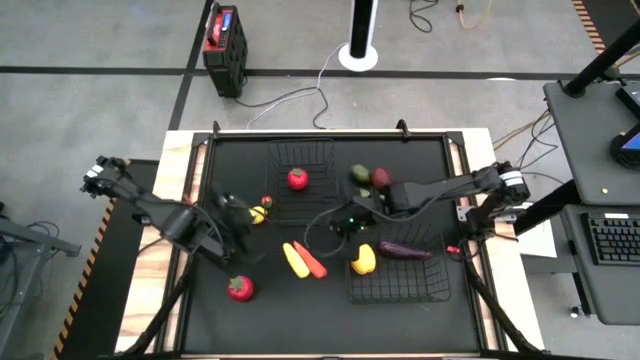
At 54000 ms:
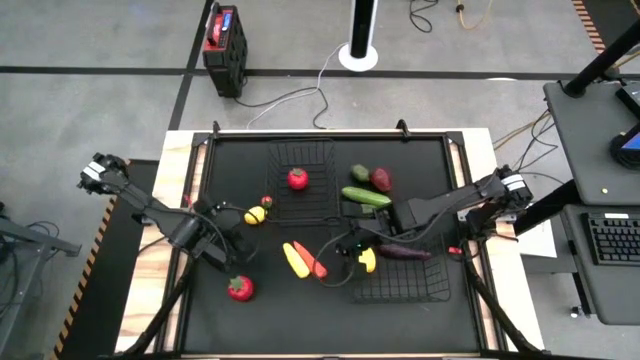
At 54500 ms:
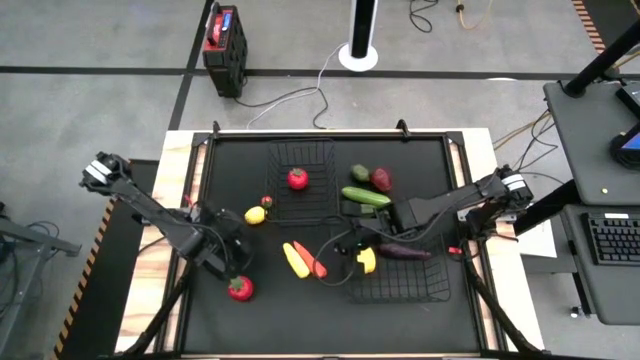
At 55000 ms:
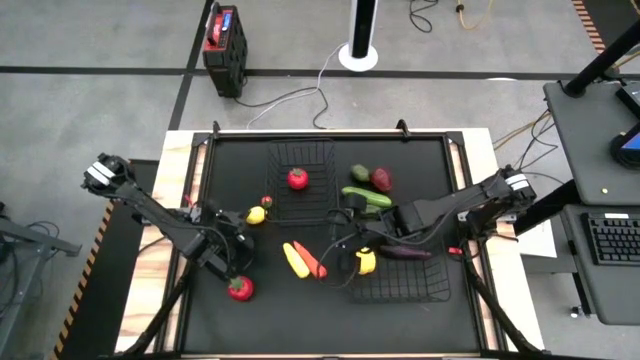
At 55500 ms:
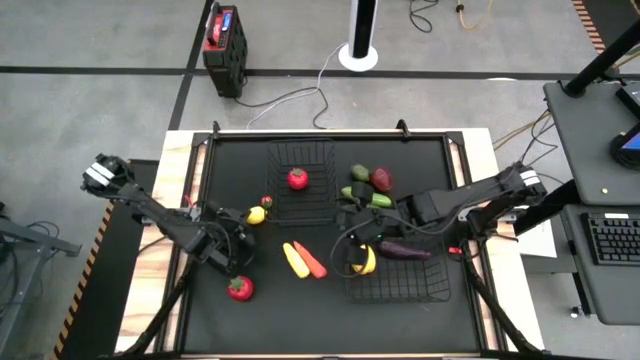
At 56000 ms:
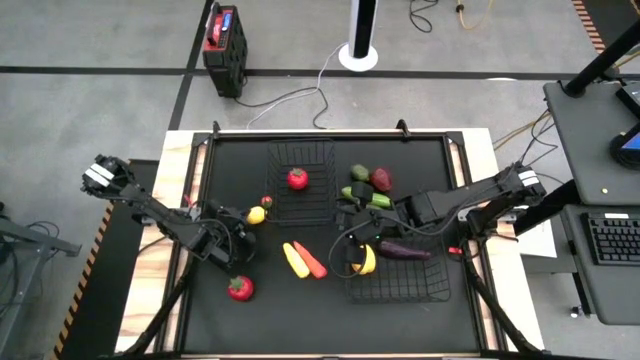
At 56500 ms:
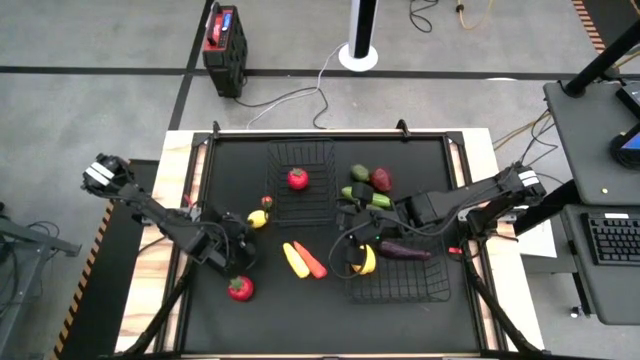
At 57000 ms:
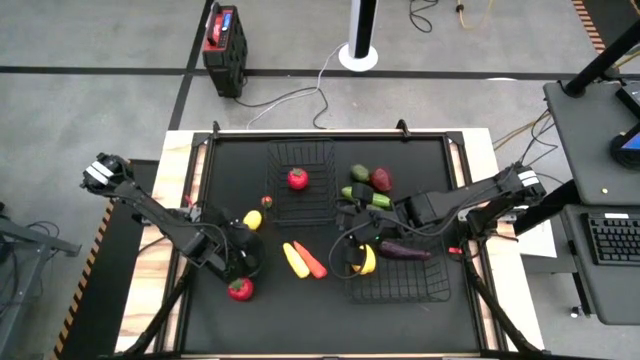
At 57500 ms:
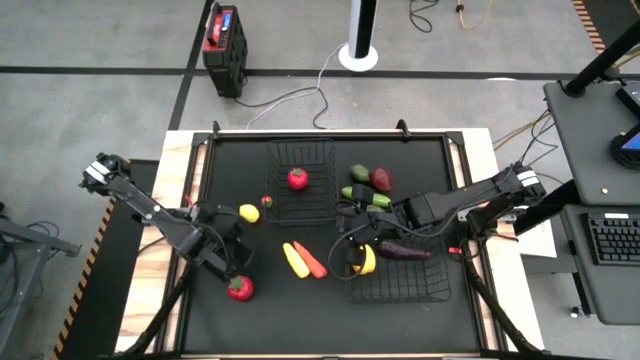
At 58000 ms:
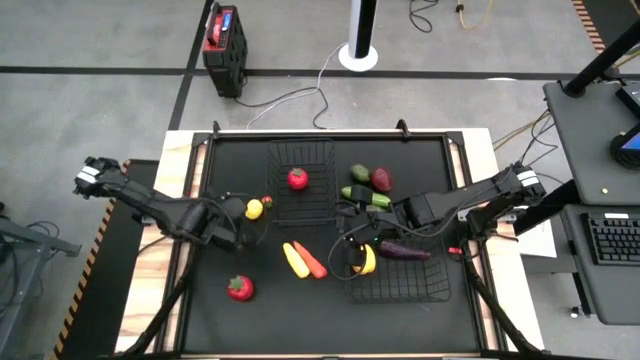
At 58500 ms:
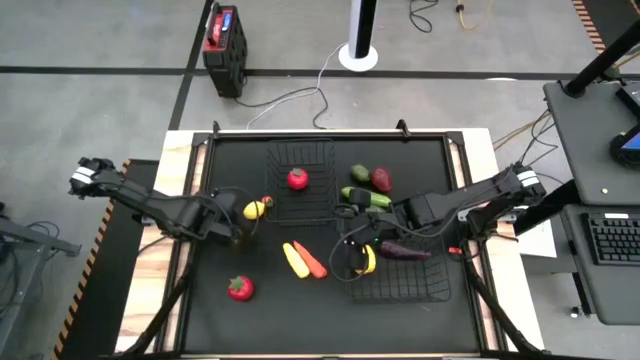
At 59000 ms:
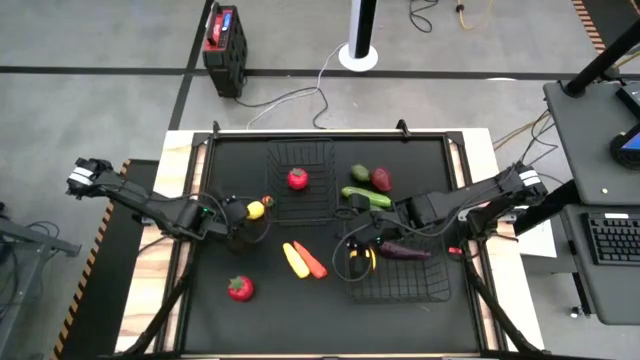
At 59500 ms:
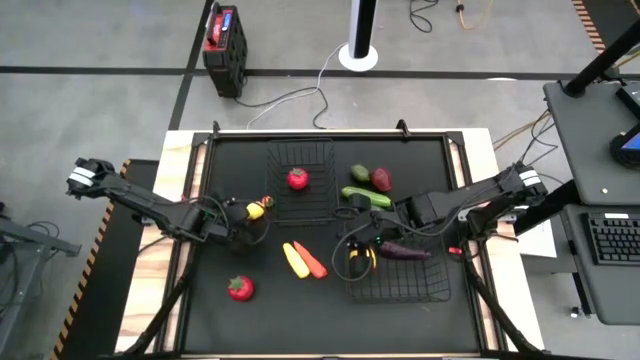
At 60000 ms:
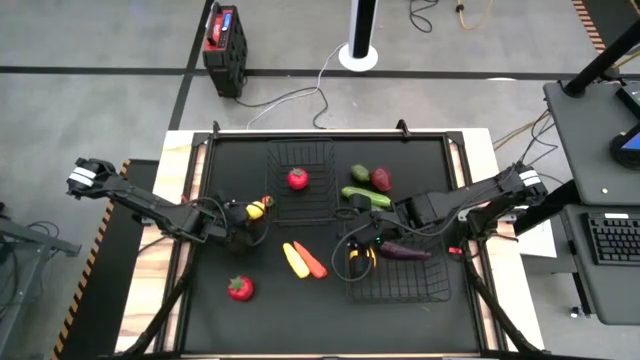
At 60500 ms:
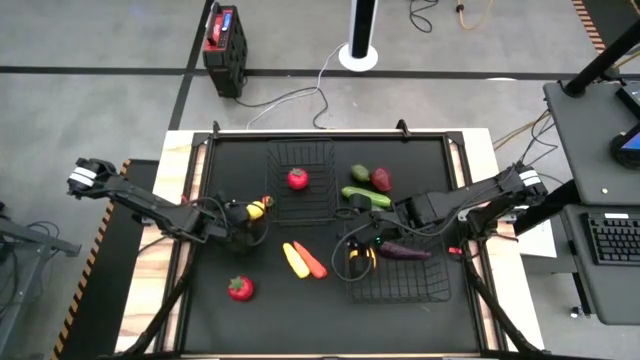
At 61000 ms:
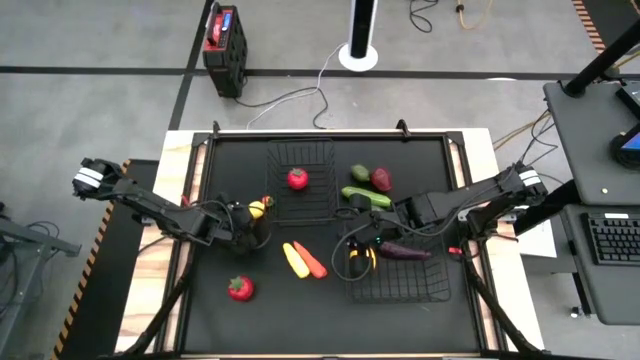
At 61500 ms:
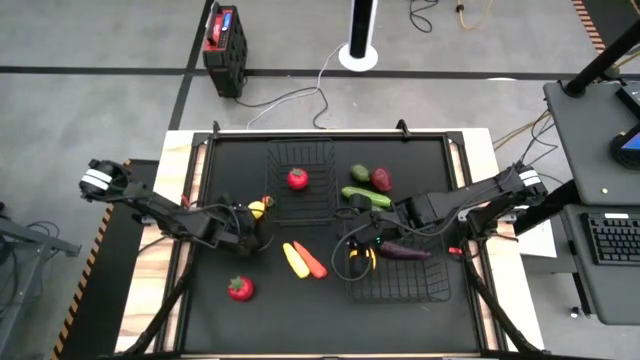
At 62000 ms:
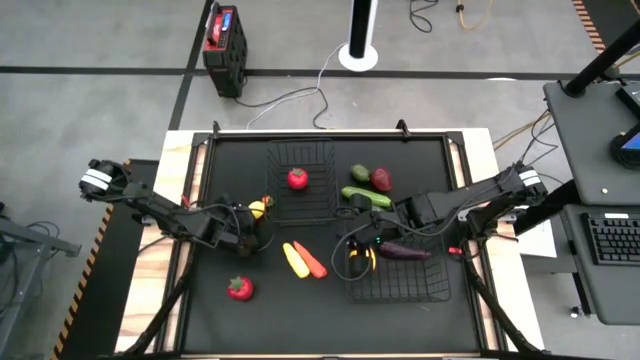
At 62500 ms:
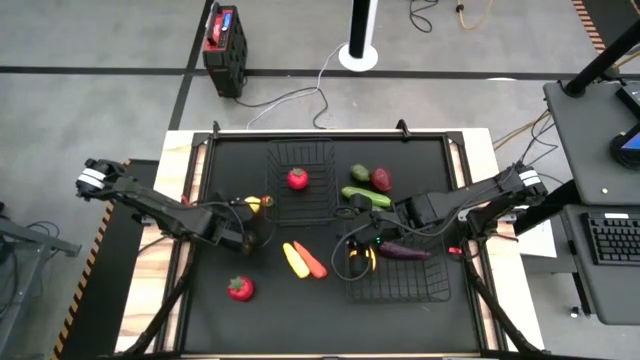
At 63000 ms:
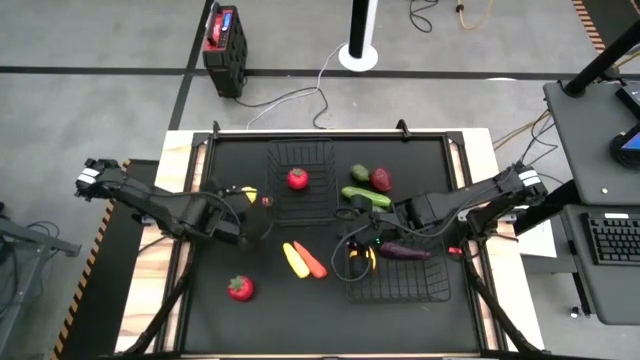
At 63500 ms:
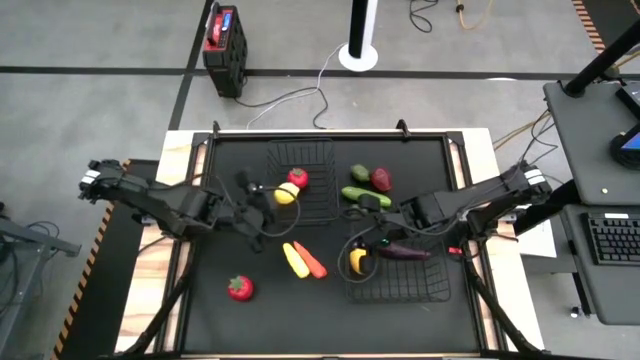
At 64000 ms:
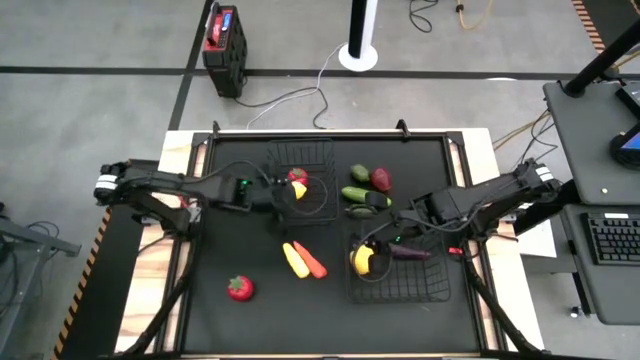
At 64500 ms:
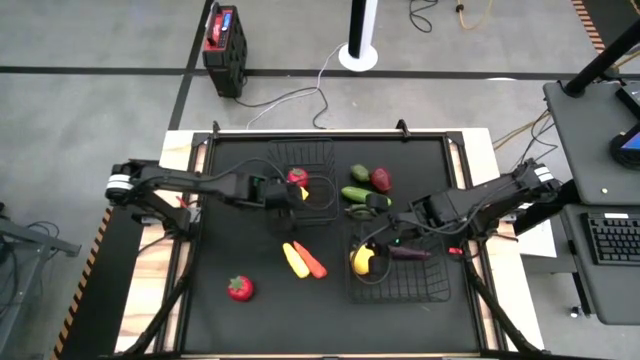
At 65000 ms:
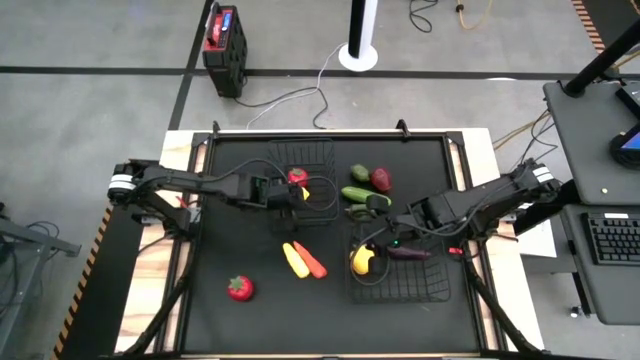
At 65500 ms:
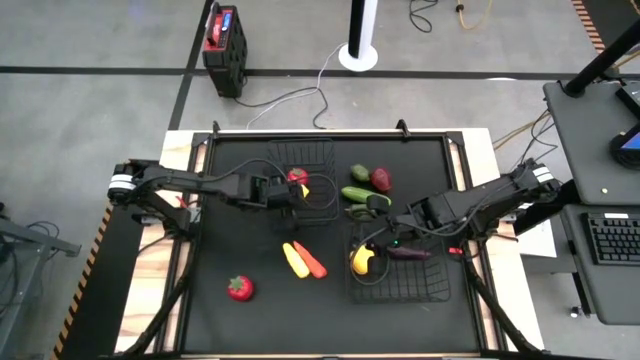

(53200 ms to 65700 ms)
Task: Sort produce into baskets
Put the yellow lemon into the top black wire basket

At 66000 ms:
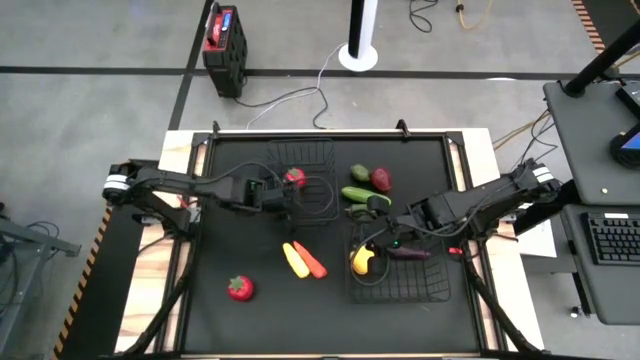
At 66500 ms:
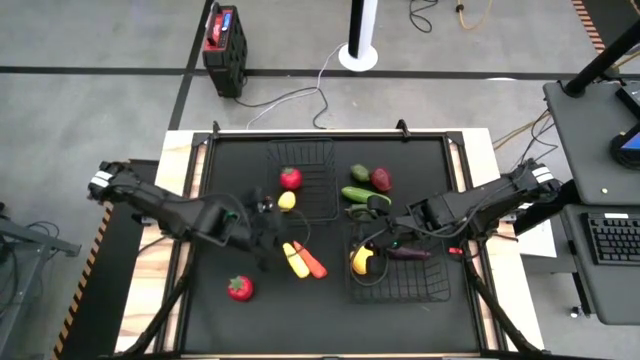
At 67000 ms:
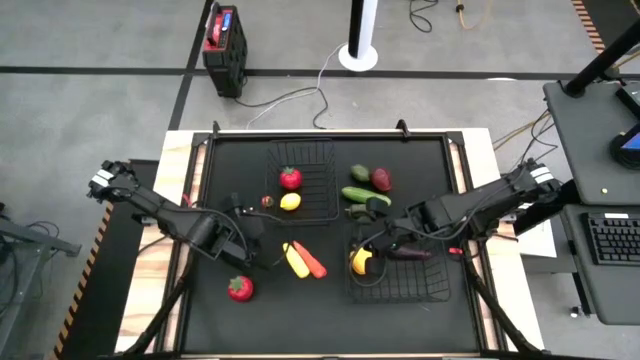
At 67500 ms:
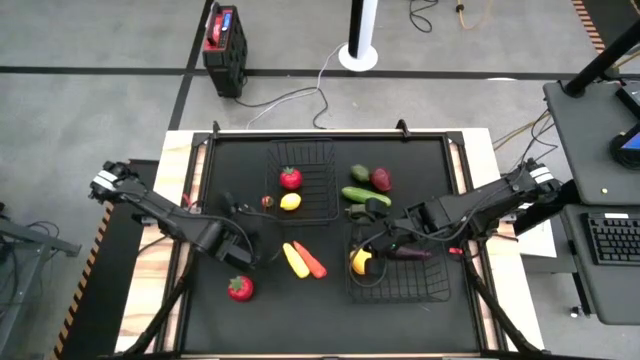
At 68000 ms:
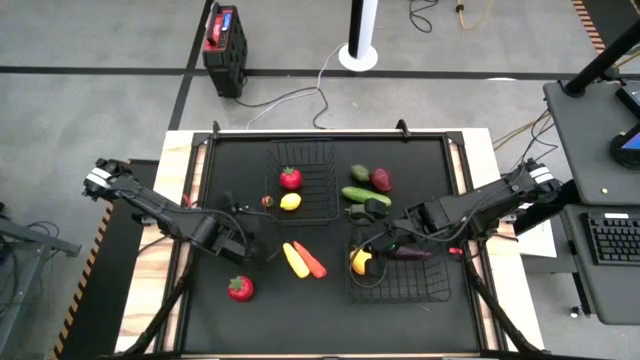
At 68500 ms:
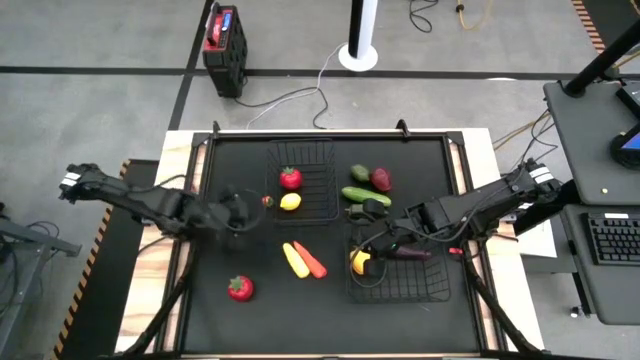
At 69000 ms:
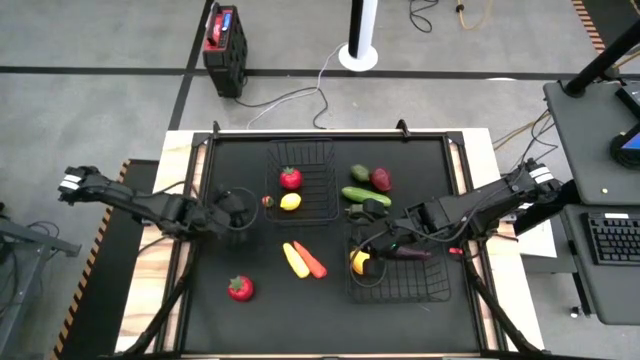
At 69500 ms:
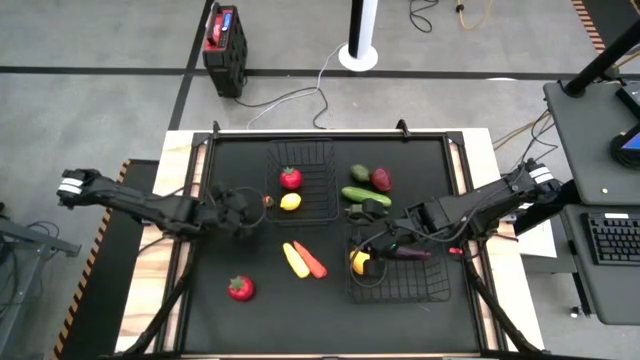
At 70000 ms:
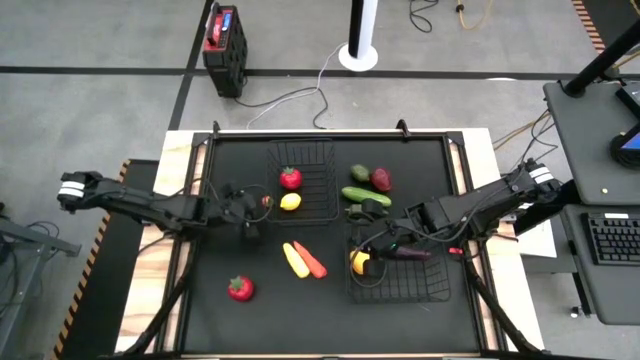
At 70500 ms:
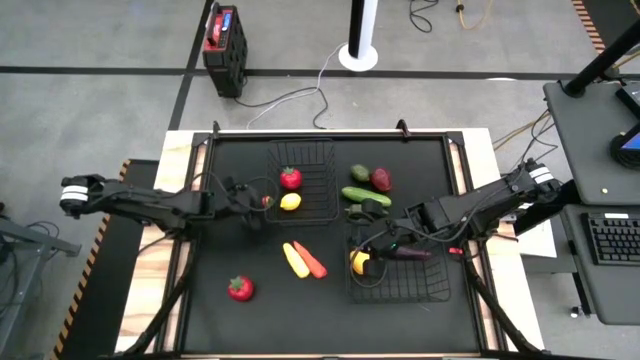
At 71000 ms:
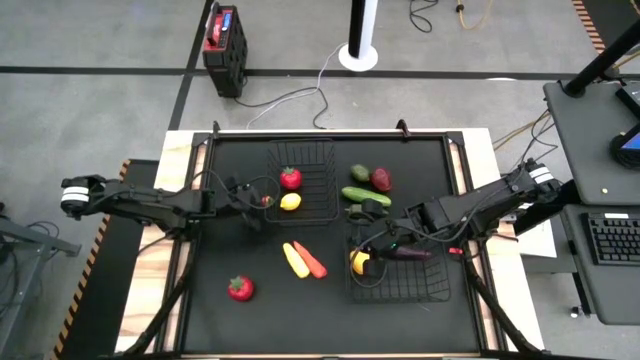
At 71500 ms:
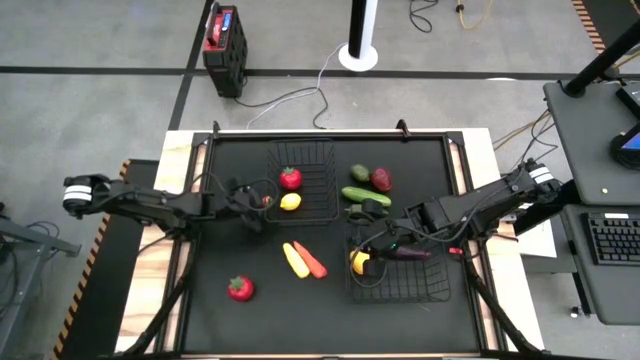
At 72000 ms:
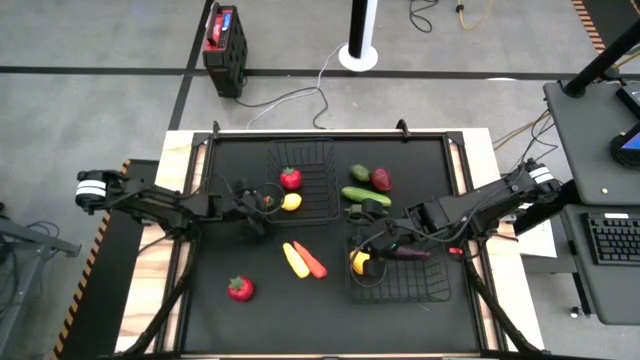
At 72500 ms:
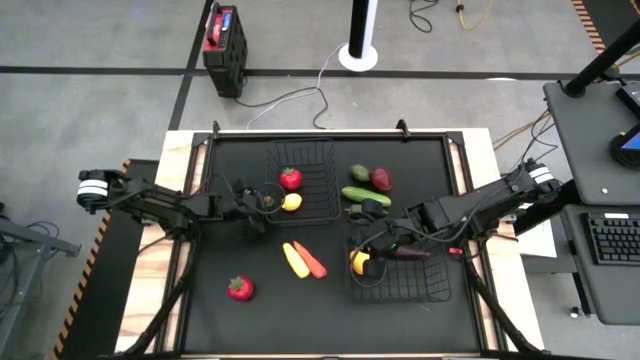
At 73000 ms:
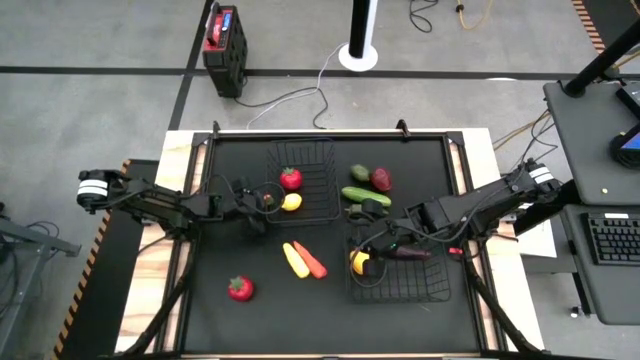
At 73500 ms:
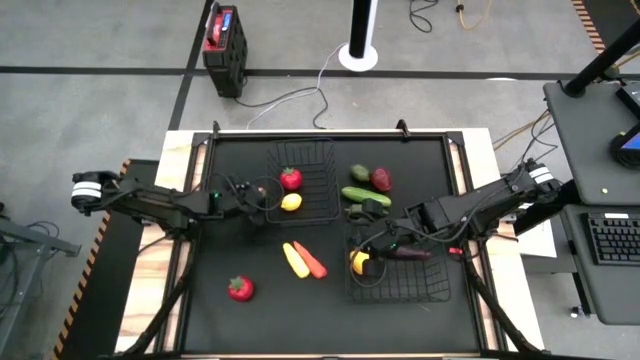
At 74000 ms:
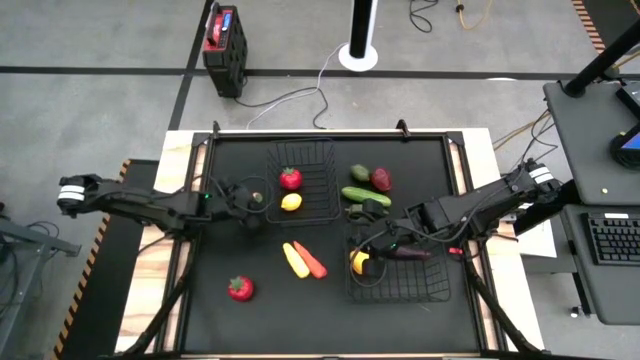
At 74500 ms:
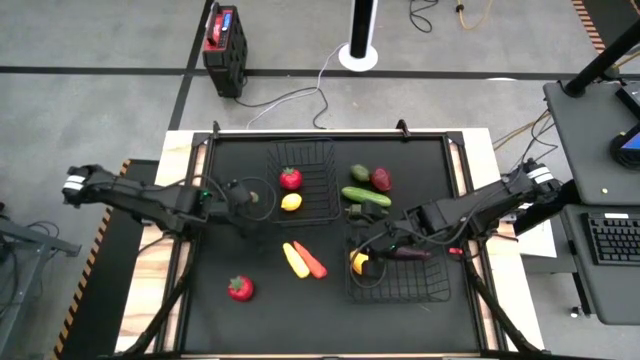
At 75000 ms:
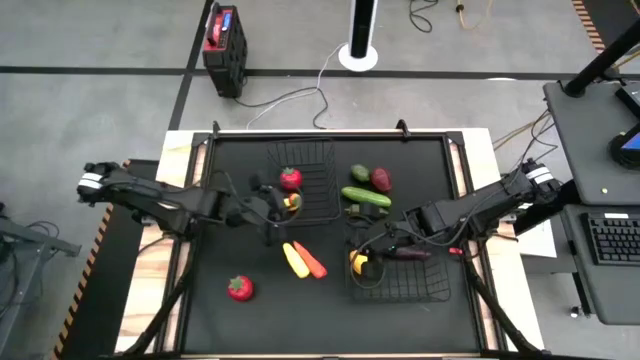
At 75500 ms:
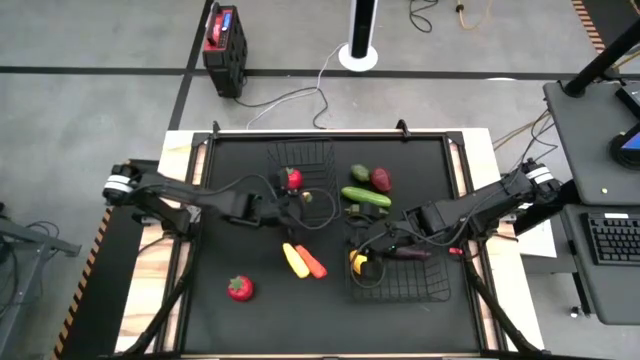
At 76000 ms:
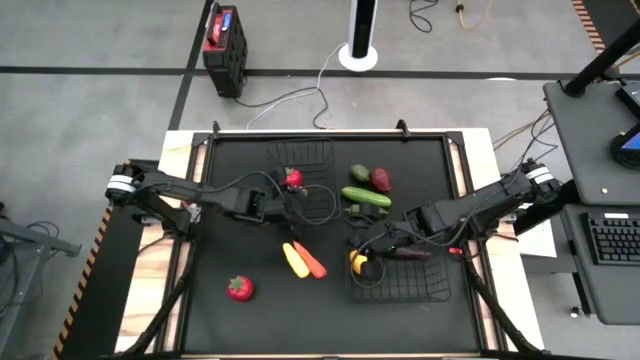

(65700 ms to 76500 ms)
Put the tomato into the top black wire basket
